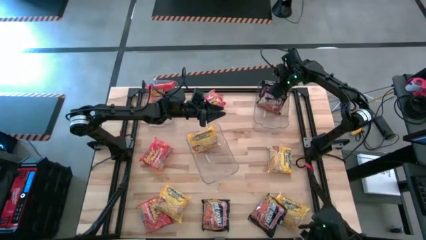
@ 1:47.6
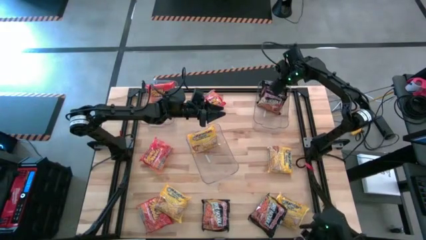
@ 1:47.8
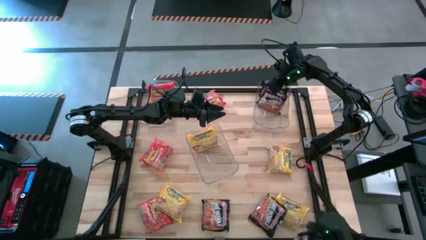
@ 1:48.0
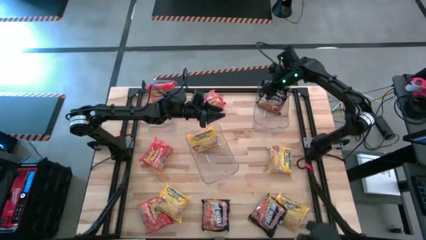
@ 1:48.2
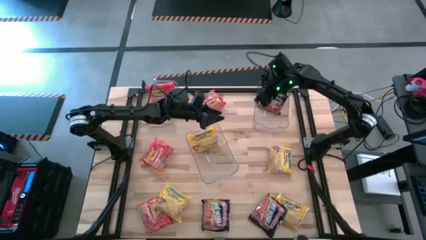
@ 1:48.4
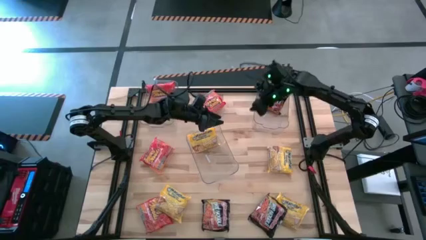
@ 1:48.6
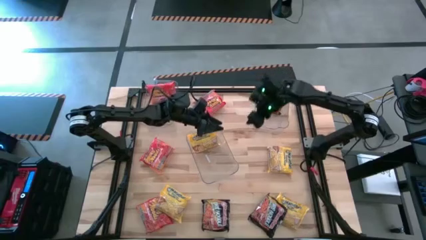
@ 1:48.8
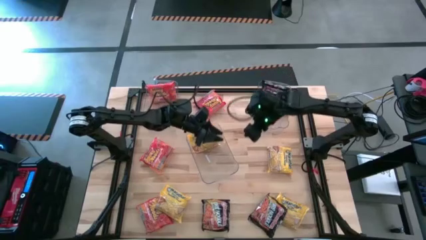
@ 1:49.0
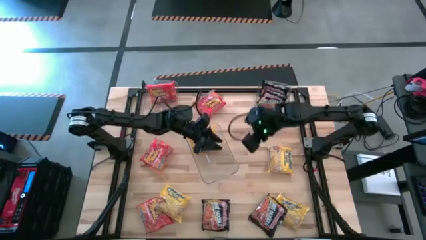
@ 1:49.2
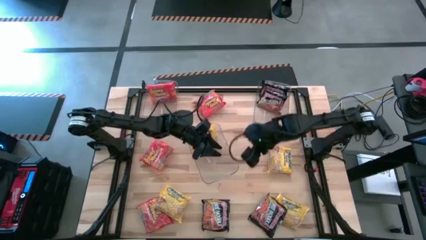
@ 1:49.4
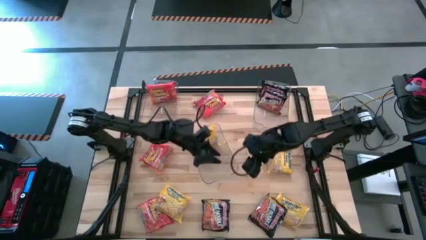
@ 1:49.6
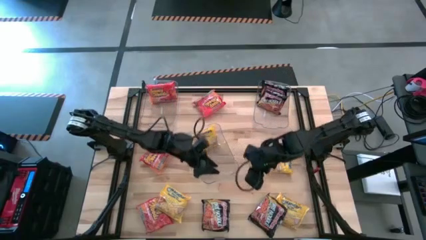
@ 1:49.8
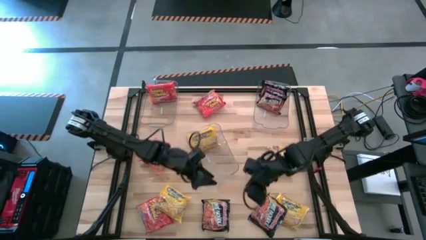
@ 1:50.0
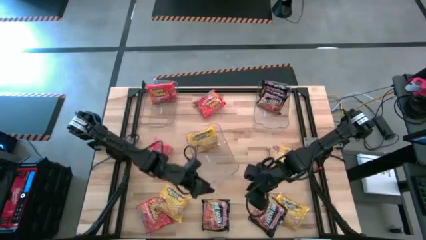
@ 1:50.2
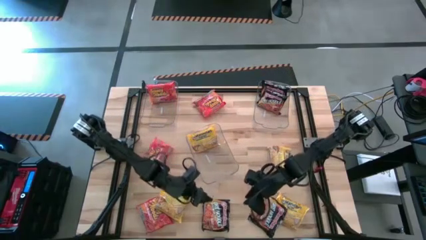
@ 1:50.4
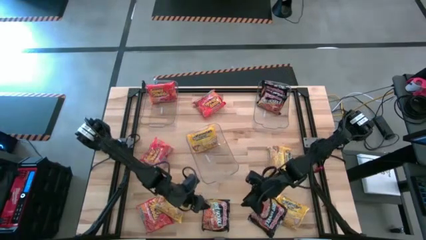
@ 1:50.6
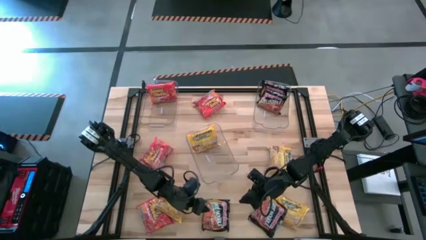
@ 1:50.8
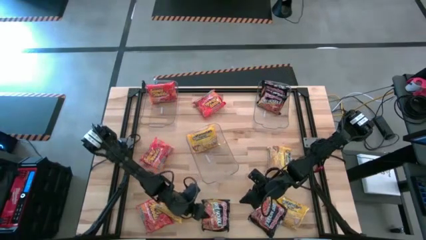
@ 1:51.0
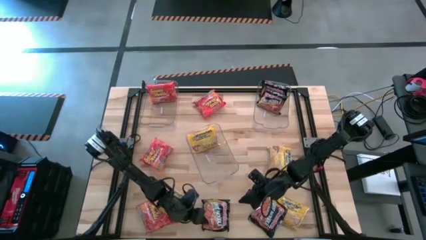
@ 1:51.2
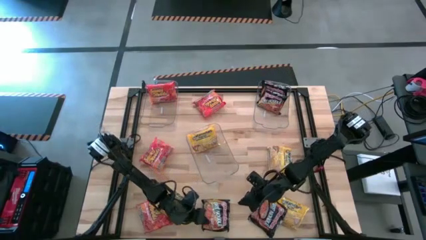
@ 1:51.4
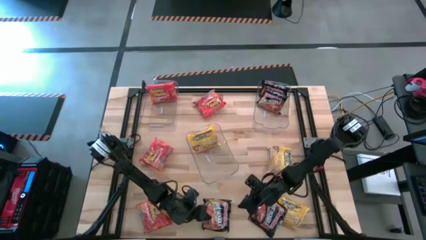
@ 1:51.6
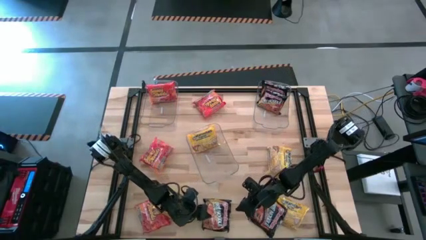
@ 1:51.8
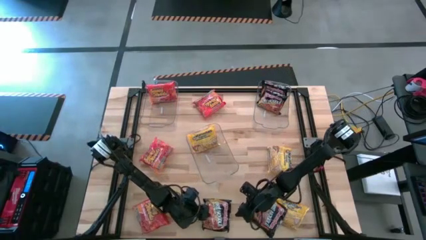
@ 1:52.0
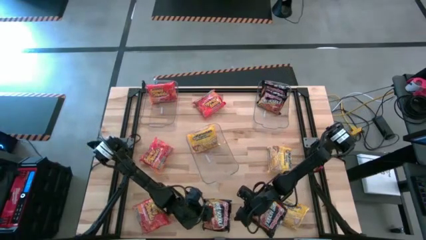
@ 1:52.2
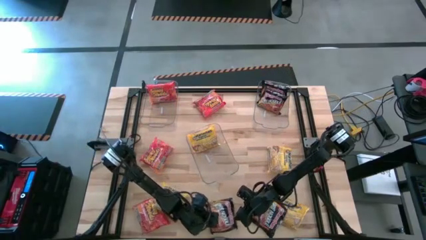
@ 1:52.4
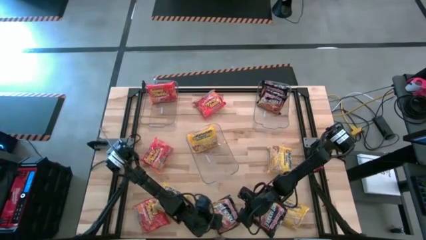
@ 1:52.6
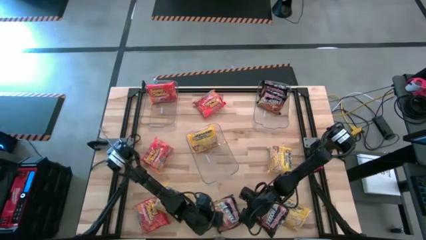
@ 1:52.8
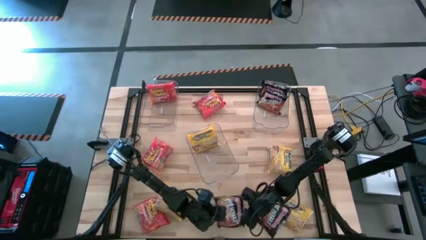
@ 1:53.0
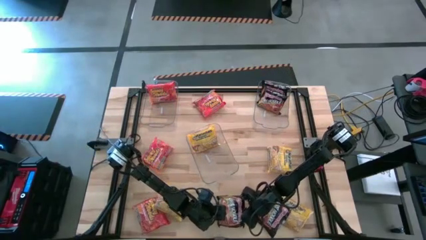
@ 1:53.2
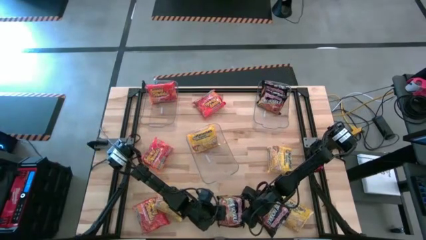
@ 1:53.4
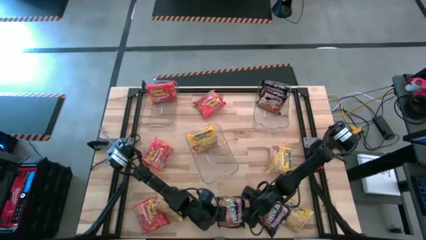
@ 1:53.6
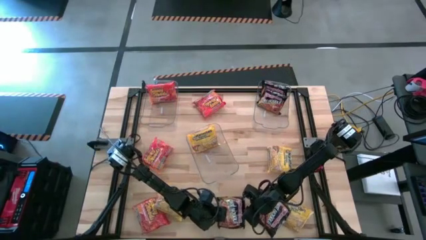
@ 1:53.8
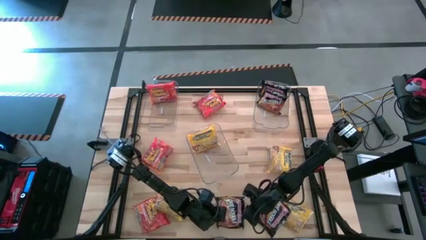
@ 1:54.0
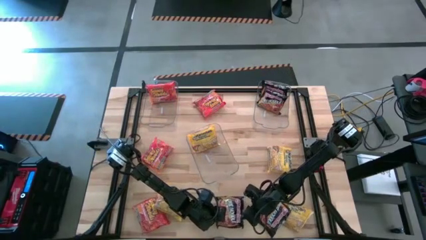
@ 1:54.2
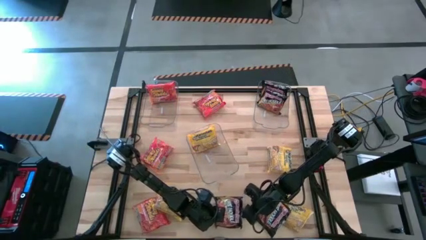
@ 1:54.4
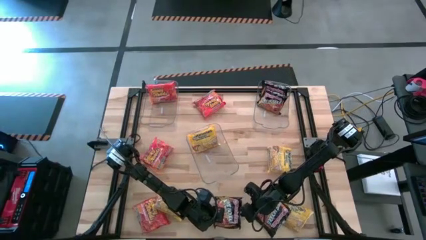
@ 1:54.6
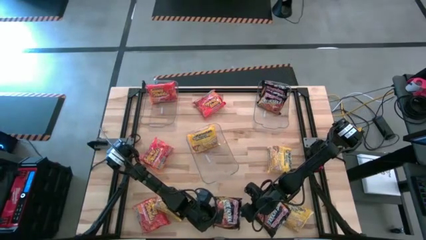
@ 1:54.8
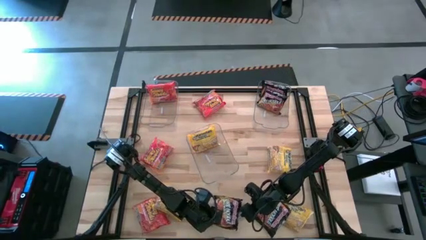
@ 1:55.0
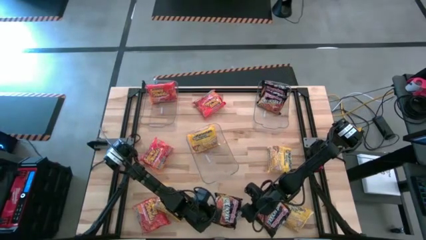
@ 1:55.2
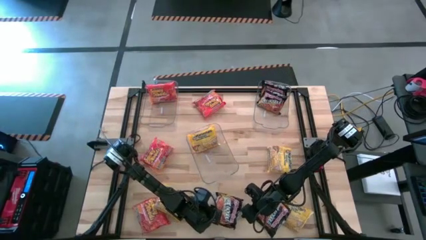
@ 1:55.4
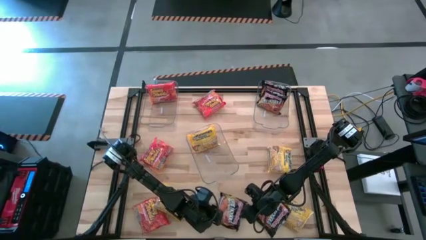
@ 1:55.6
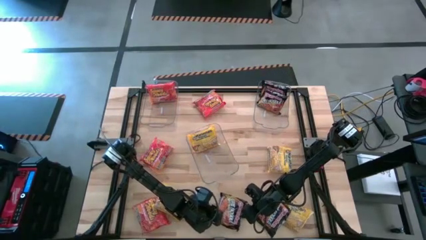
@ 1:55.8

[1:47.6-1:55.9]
Task: Sort Maruchan noodles
Put the left black noodle pack into the top right transparent bin

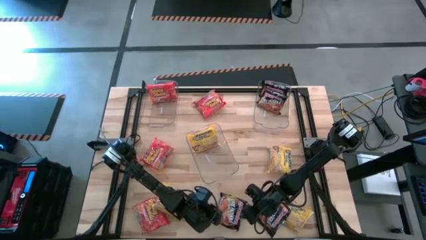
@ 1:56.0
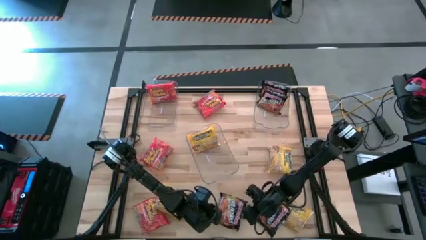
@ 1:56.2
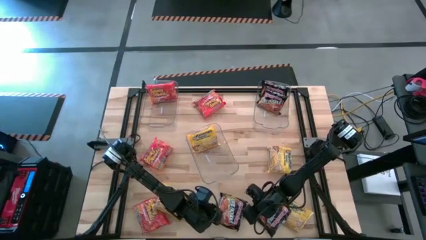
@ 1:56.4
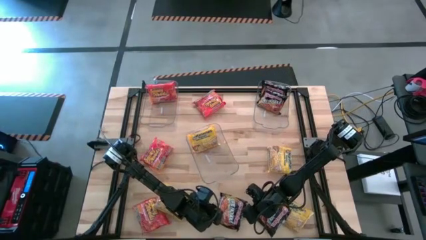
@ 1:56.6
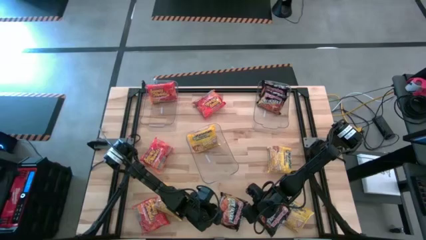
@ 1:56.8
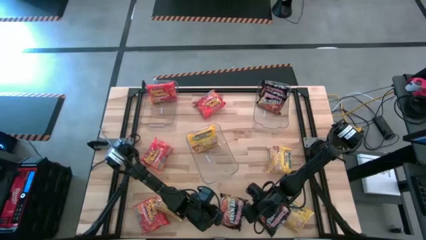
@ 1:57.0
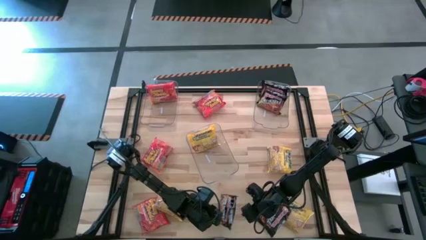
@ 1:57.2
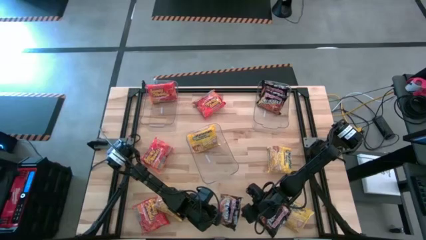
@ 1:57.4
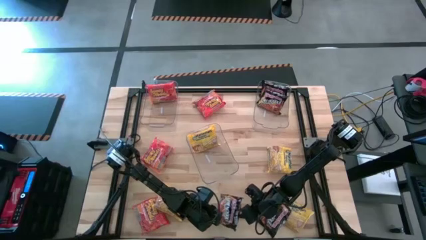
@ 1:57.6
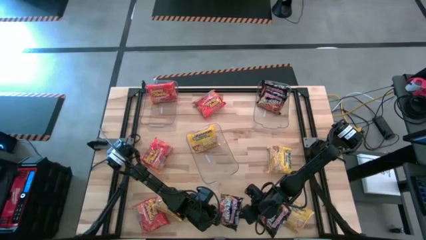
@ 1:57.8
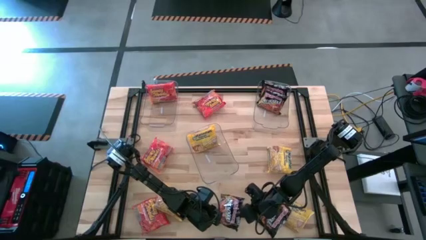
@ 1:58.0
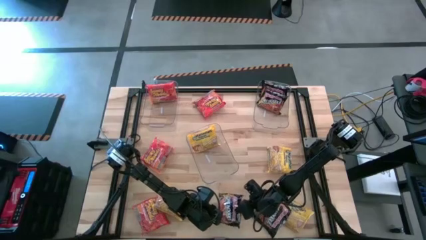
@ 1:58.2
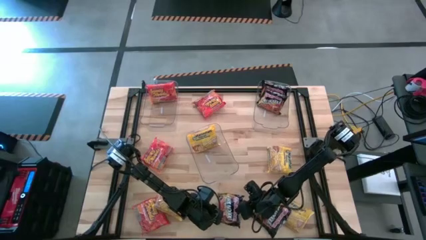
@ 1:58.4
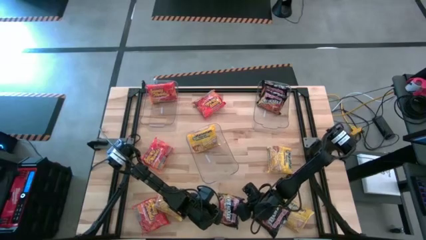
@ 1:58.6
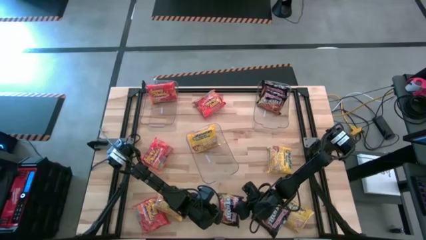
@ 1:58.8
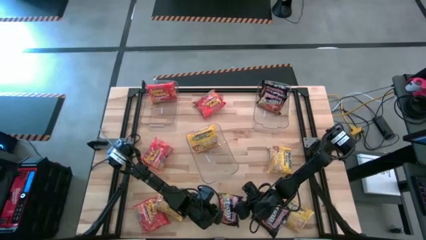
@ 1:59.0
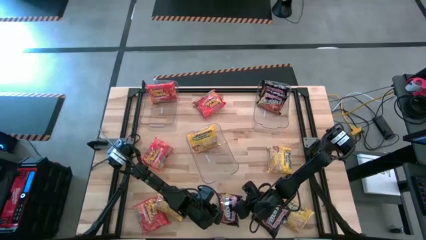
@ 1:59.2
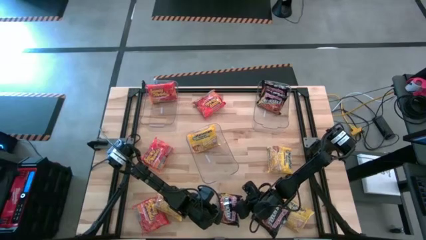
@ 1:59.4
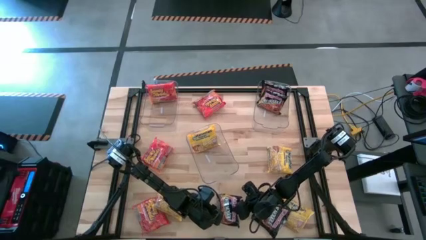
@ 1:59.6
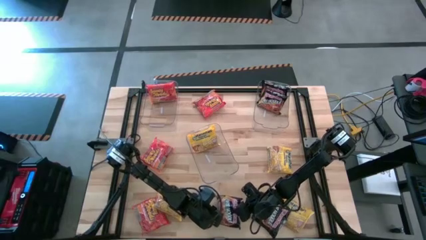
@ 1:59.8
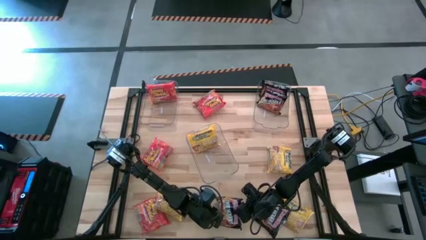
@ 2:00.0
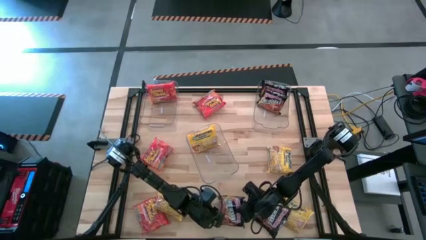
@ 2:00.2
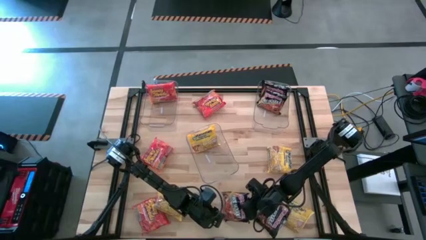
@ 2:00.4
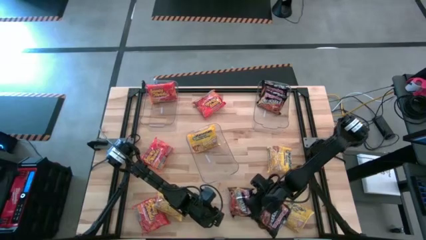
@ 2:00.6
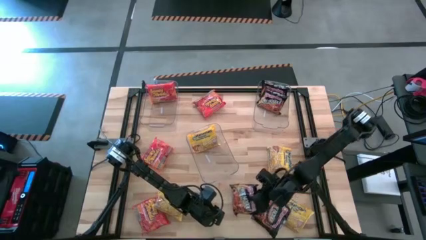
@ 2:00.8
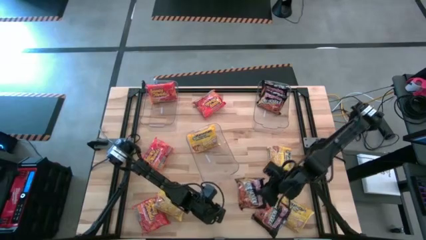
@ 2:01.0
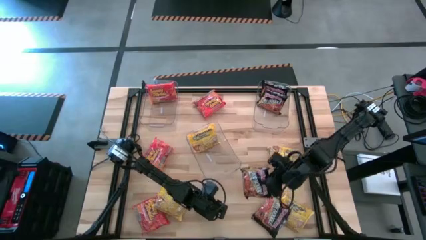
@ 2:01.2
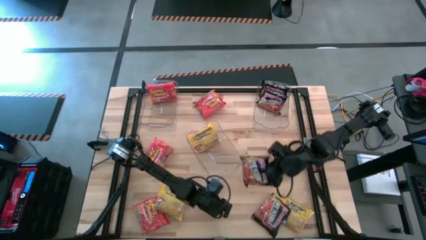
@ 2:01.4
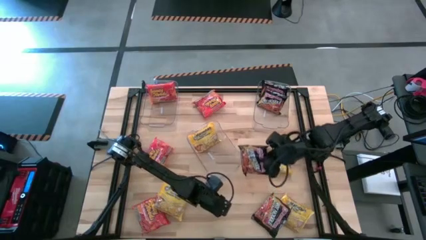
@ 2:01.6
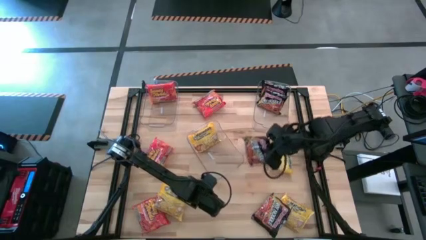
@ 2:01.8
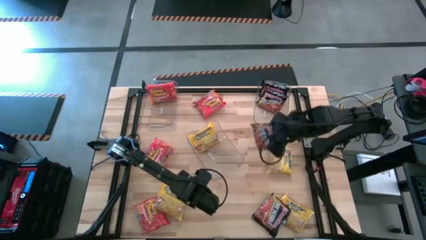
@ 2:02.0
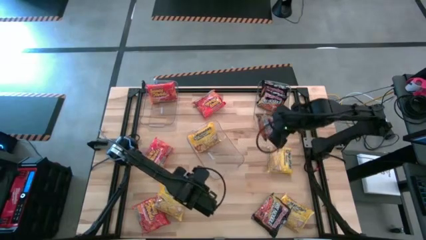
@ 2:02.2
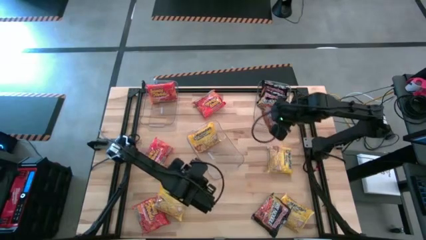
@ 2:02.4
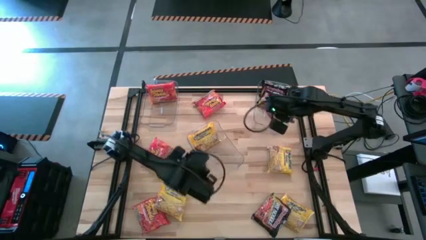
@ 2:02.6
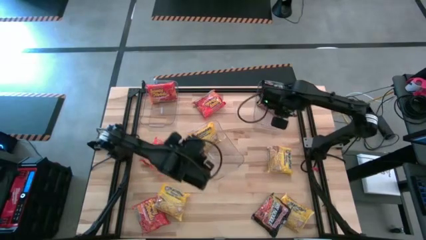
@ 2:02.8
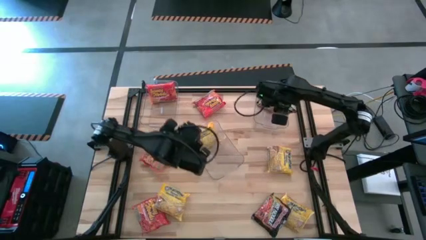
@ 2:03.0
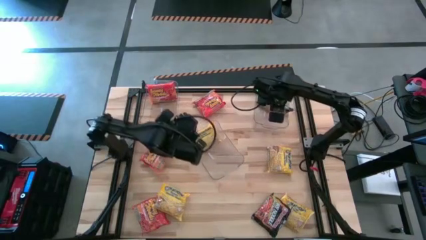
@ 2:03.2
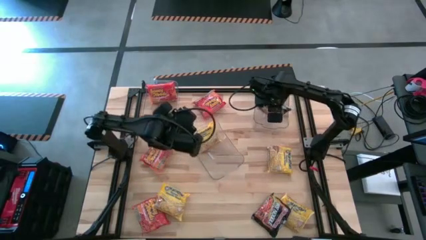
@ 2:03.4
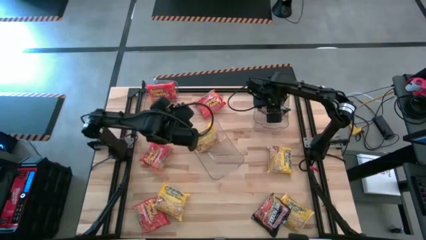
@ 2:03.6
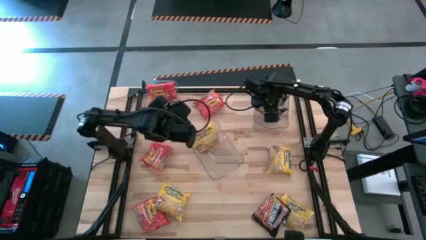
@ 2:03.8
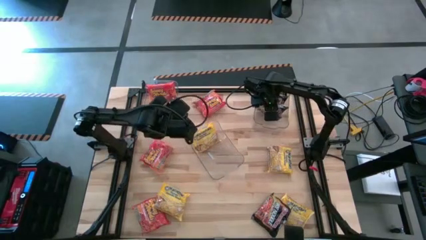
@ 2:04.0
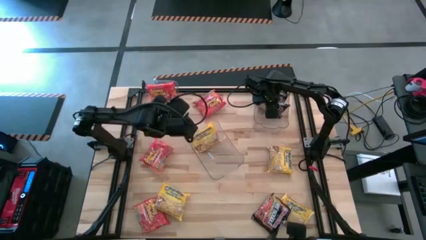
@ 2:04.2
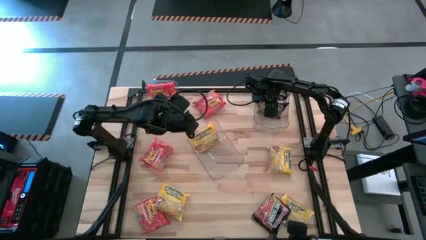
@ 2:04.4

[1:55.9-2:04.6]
Put the left black noodle pack into the top right transparent bin
